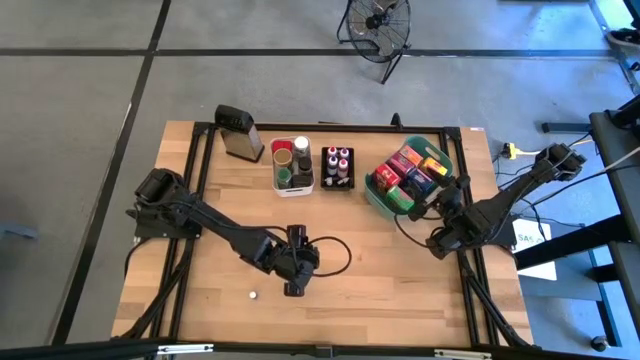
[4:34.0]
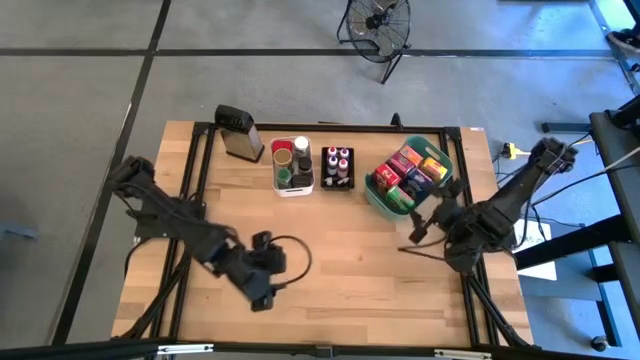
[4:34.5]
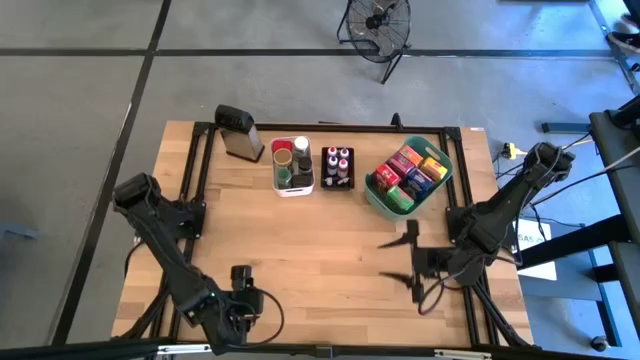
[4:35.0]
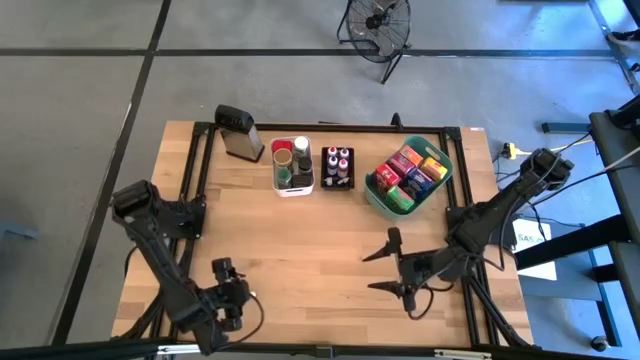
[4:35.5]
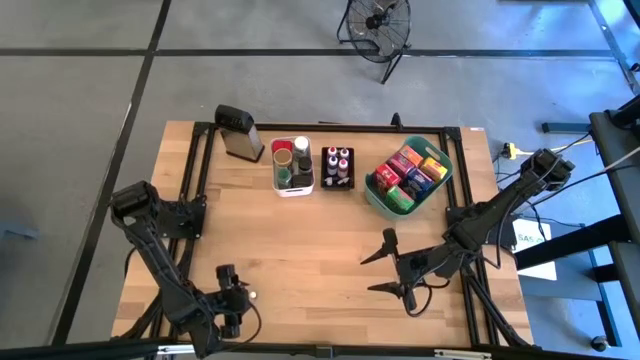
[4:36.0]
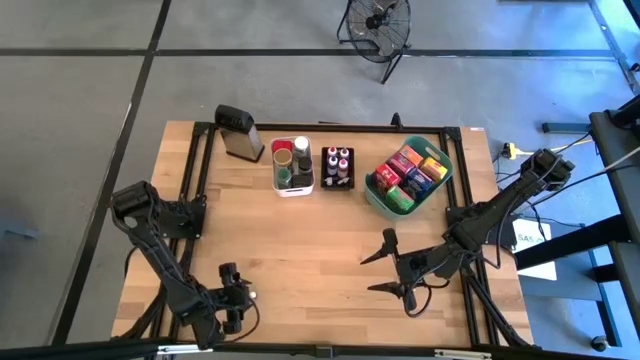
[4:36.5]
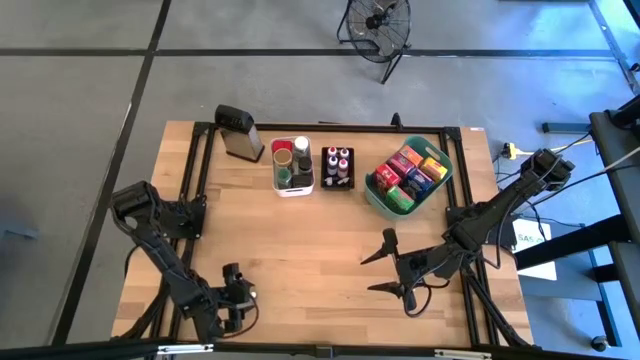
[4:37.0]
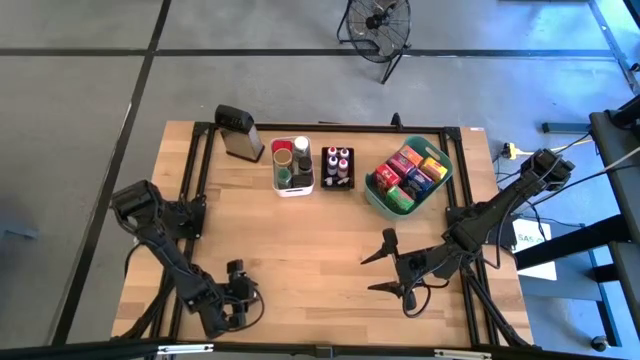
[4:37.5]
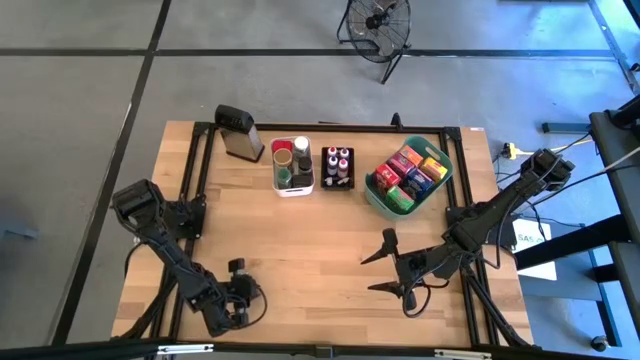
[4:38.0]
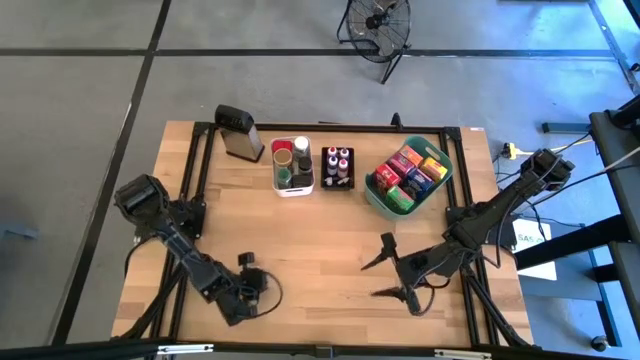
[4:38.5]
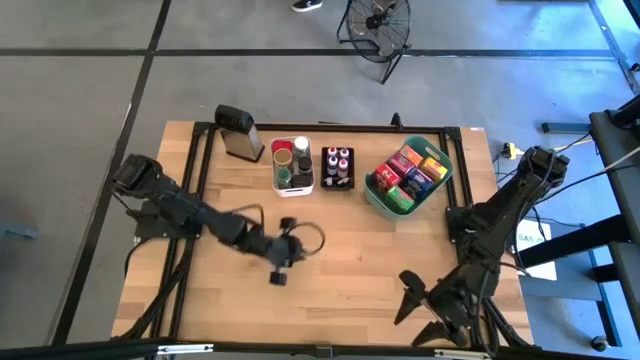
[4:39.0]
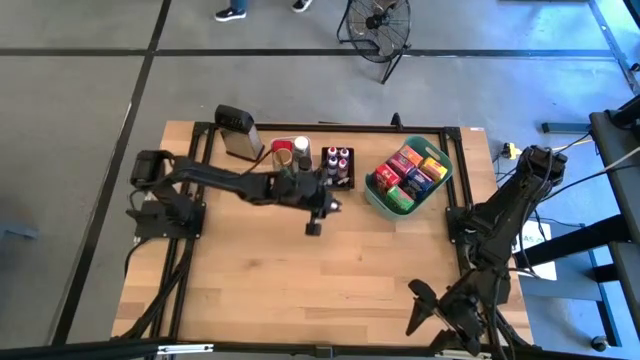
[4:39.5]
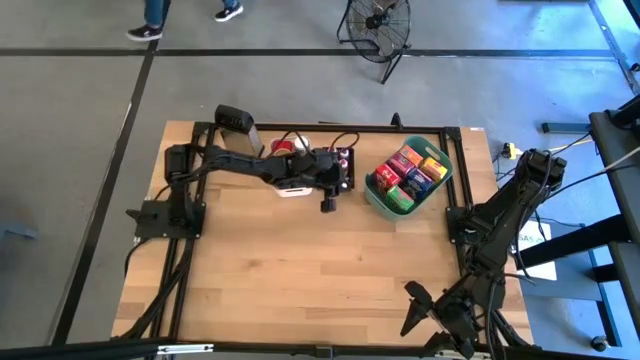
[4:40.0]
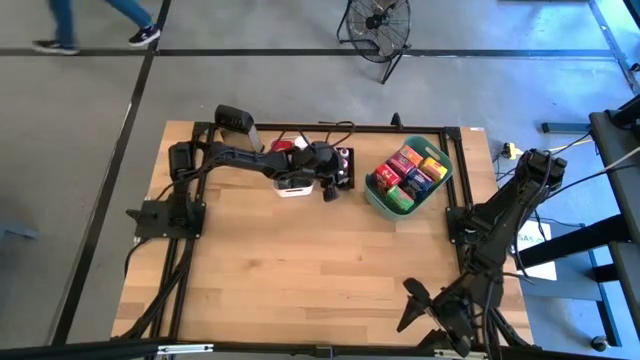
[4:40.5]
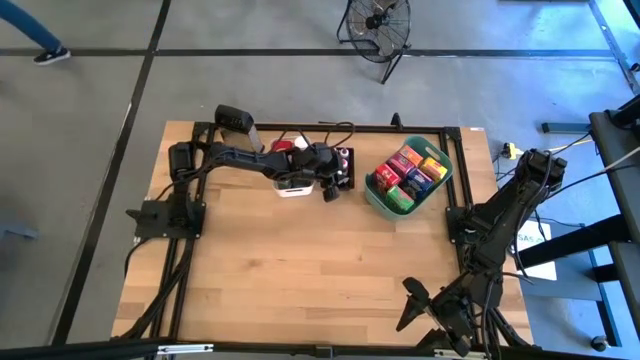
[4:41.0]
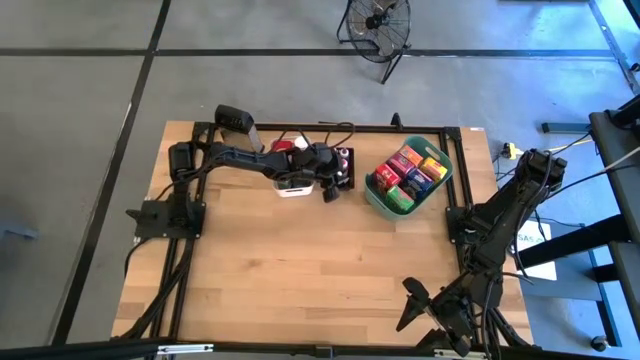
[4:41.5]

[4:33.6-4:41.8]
Task: Pick & Place Kitchen Items
Put the small pink food coloring bottle into the black bin

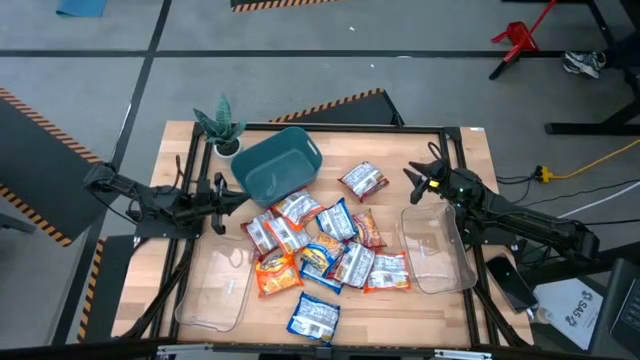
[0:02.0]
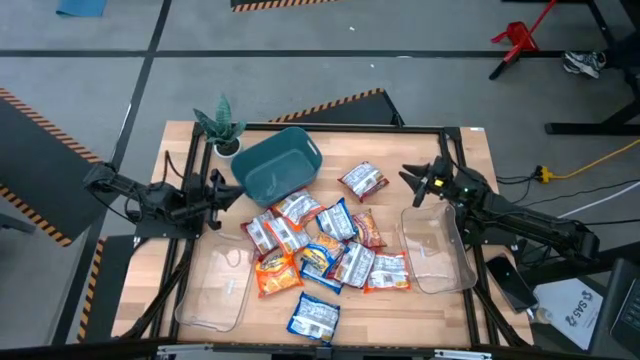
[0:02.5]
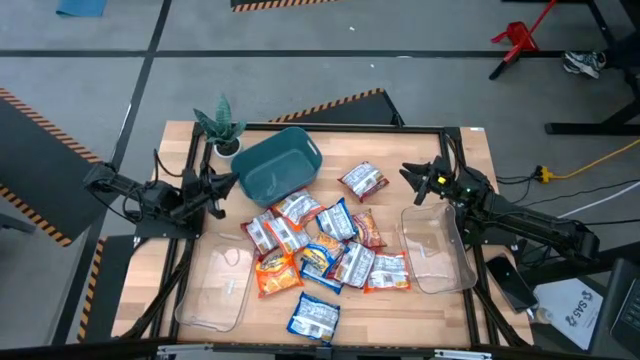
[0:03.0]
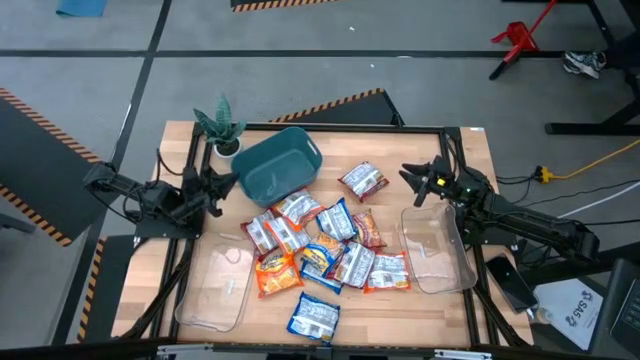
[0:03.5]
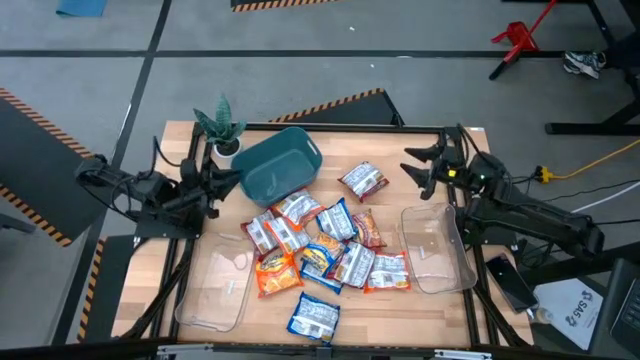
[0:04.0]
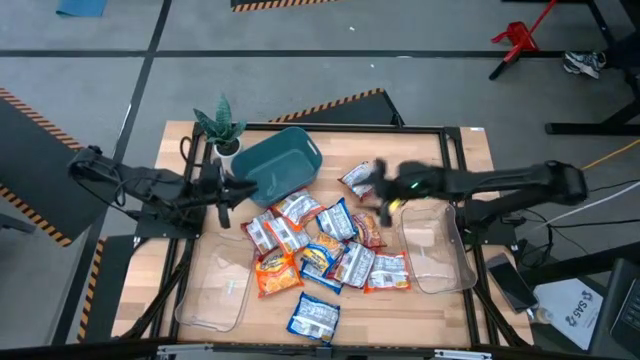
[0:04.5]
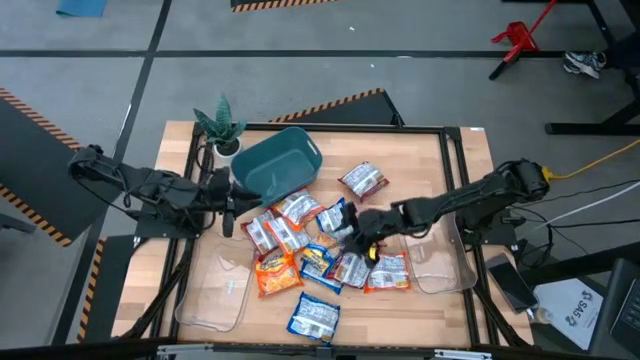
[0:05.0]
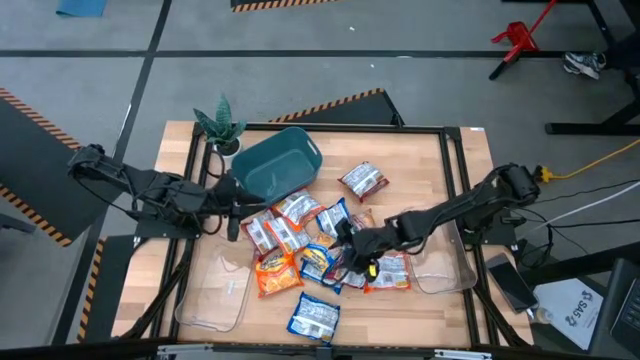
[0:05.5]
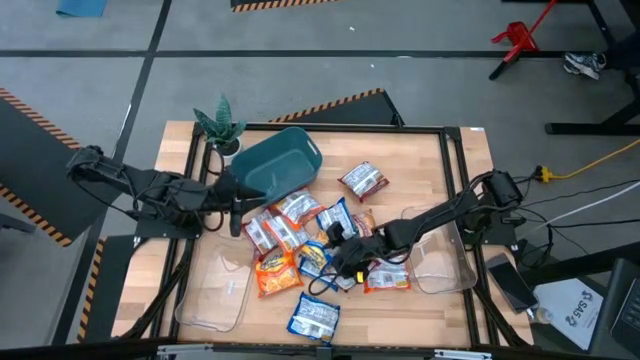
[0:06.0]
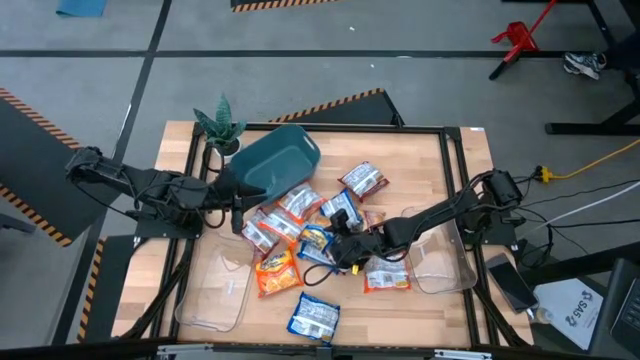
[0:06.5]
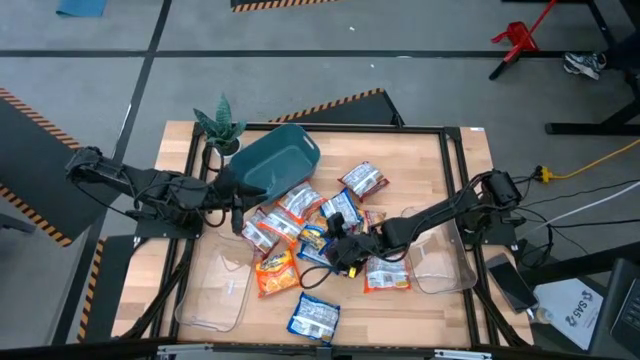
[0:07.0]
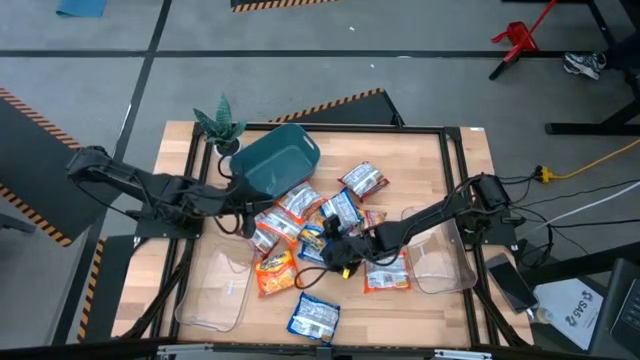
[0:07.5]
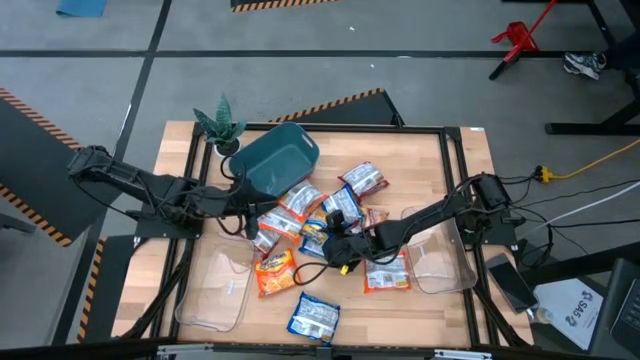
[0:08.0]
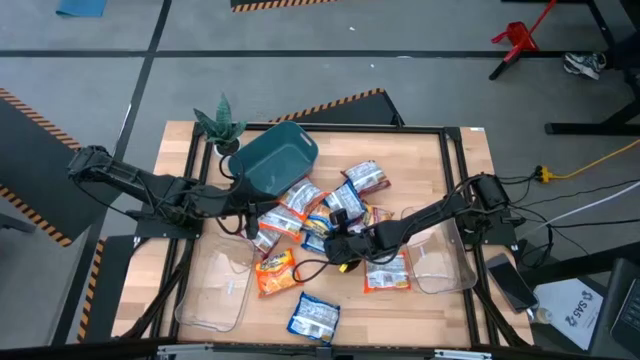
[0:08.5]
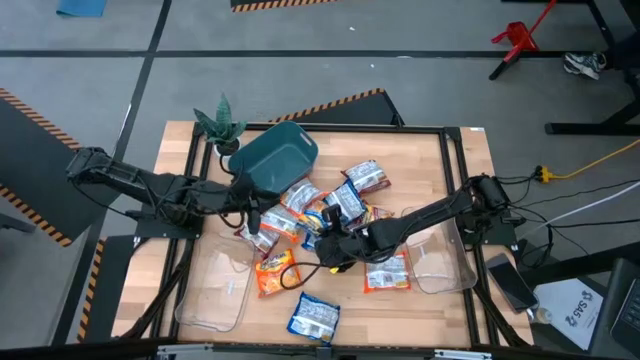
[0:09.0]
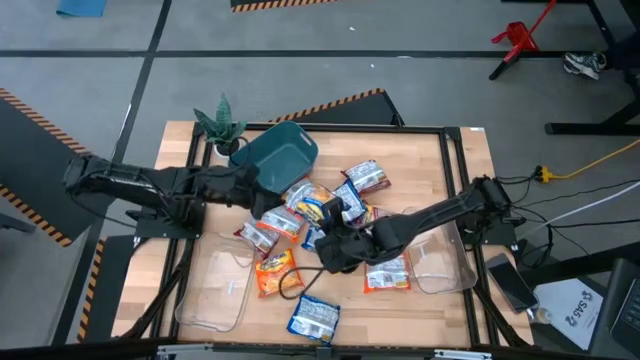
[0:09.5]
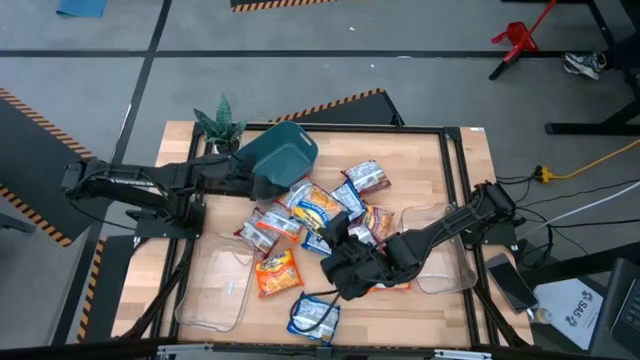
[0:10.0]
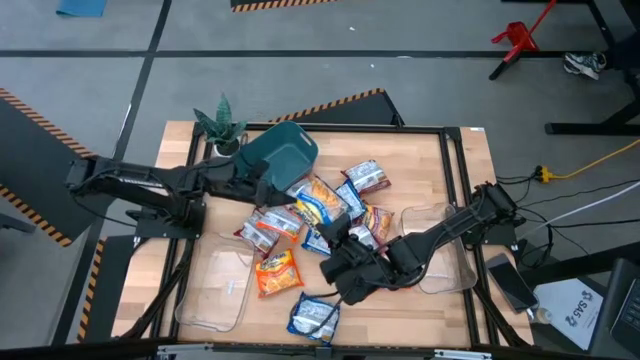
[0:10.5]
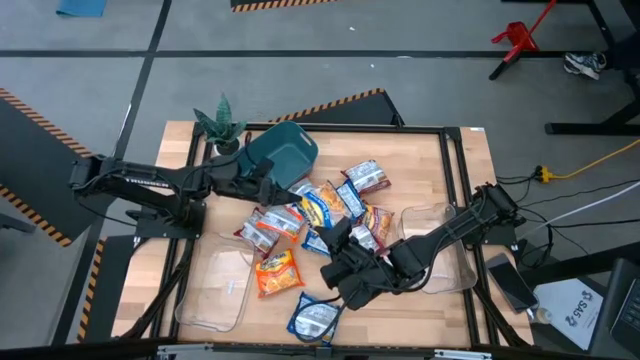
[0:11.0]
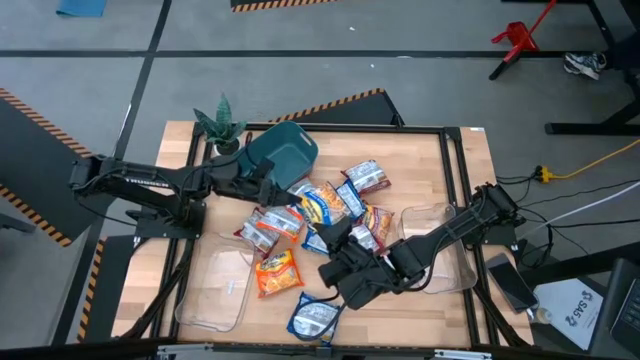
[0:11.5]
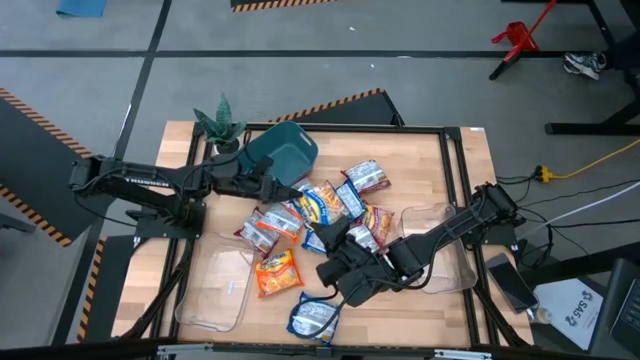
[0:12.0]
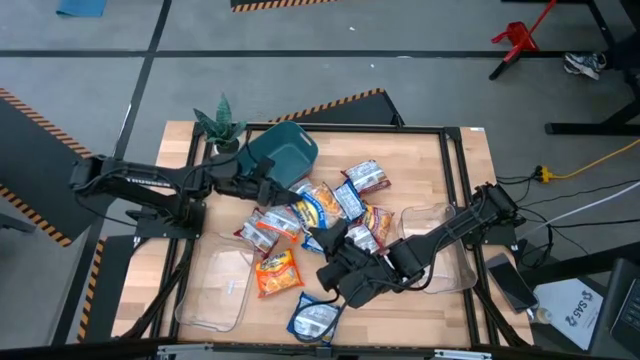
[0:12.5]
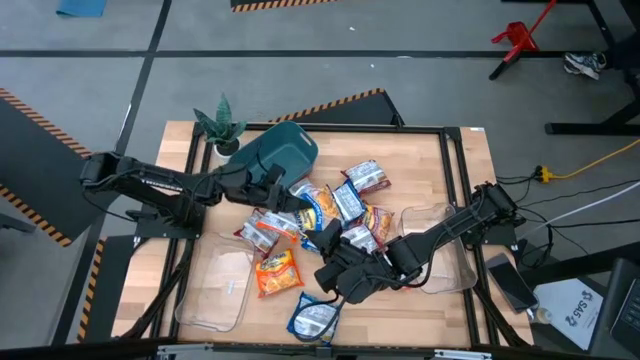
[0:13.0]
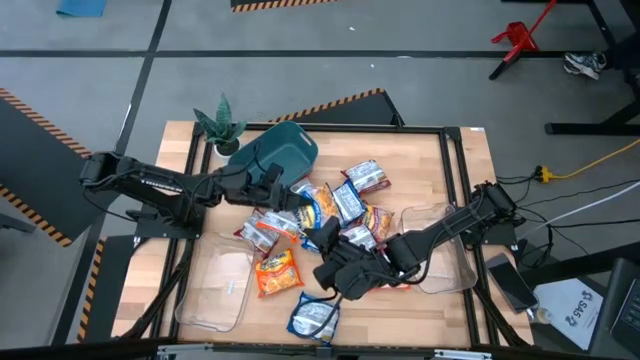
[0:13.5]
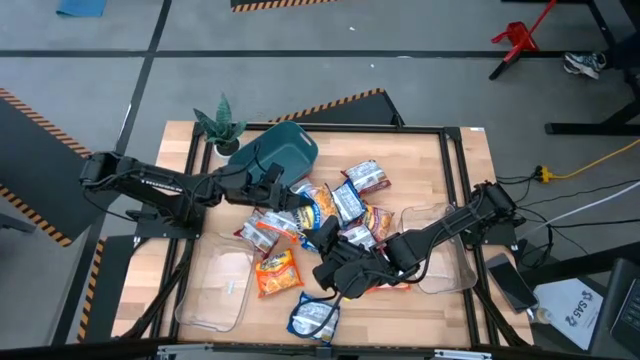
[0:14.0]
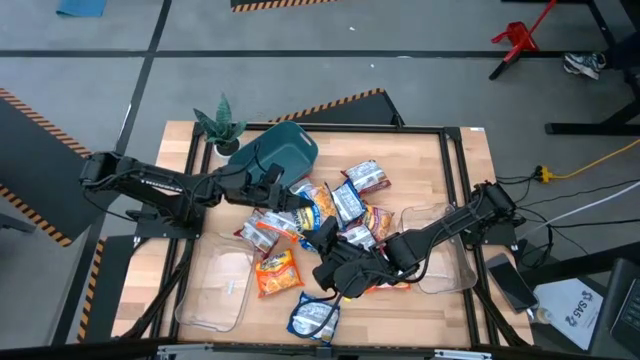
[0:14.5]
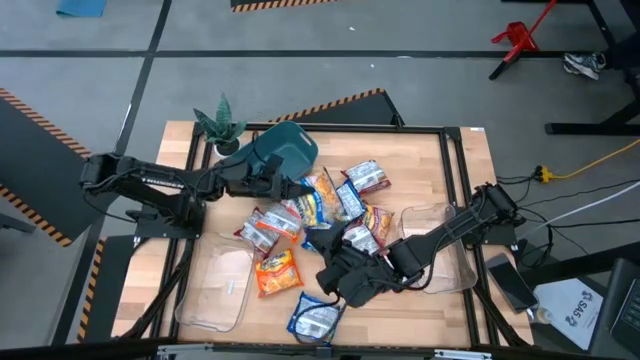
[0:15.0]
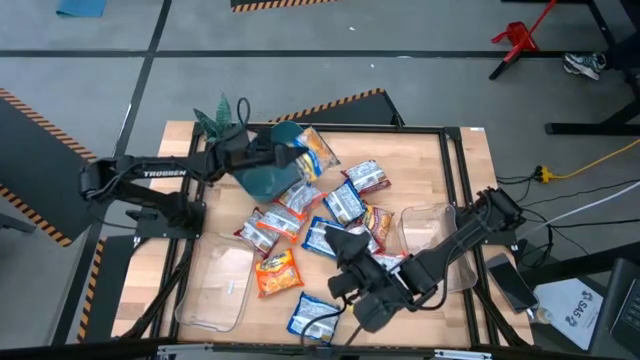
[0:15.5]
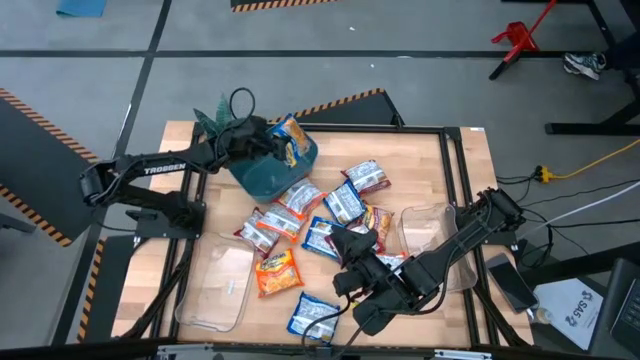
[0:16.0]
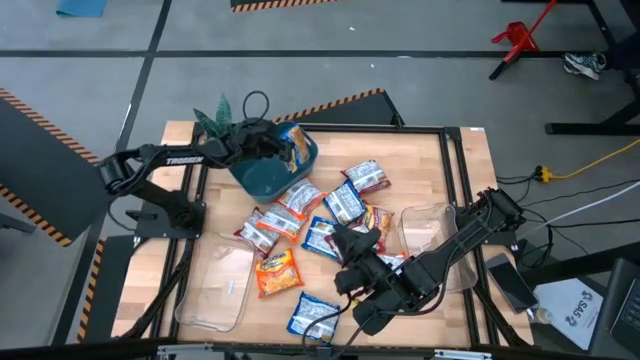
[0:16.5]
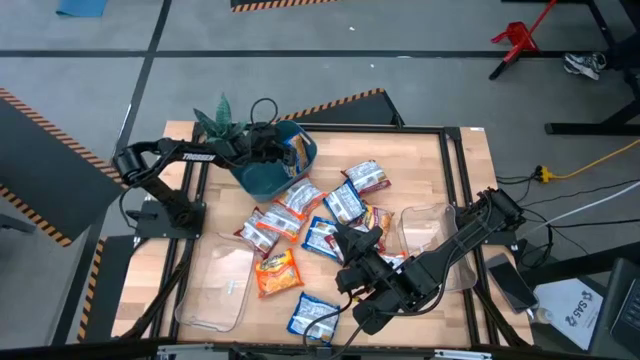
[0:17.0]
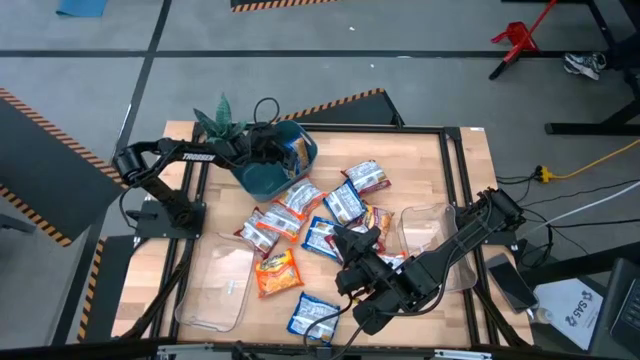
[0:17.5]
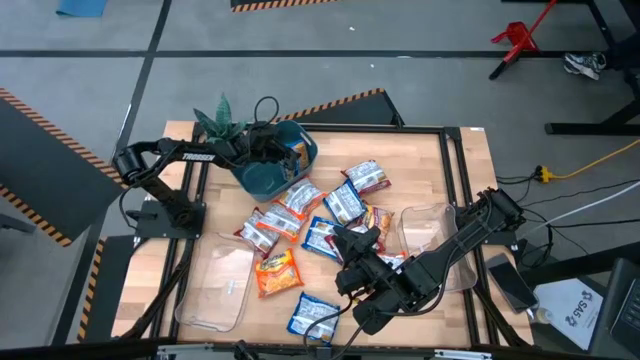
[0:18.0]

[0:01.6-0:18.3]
Task: Sort Maruchan noodles
Put the blue noodle into the blue bin
